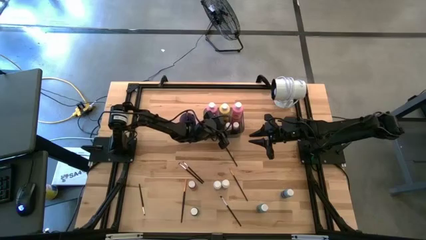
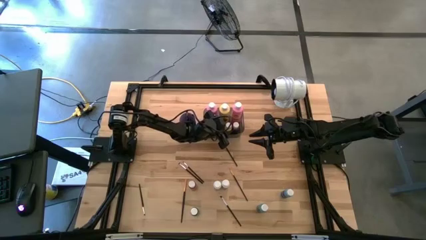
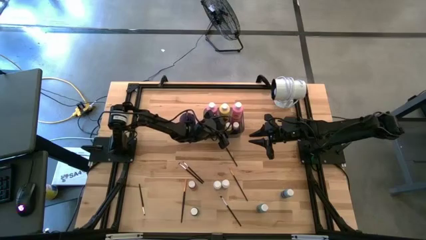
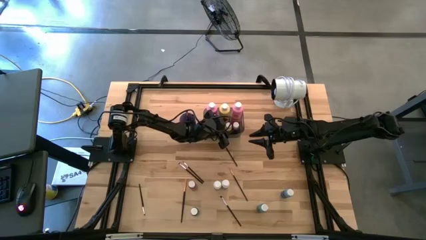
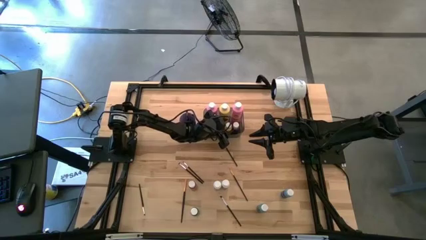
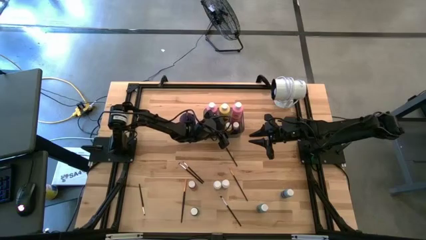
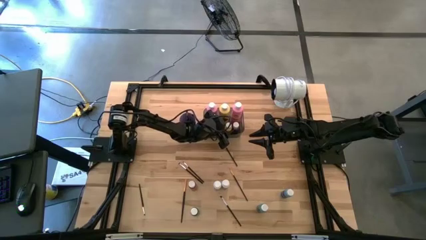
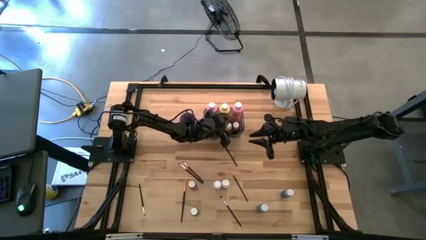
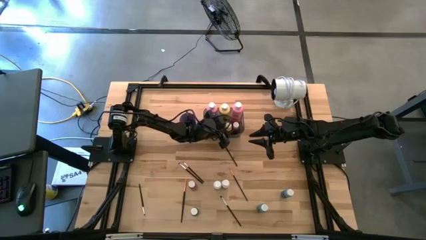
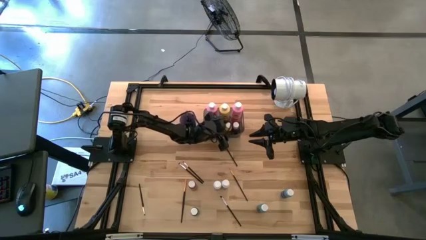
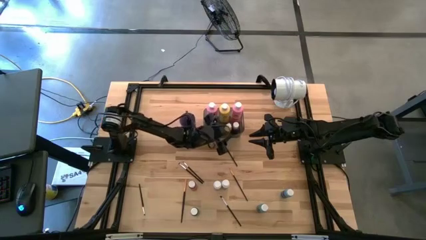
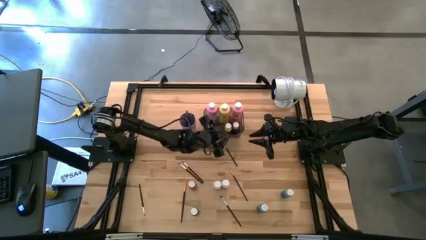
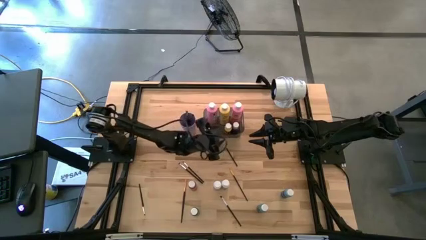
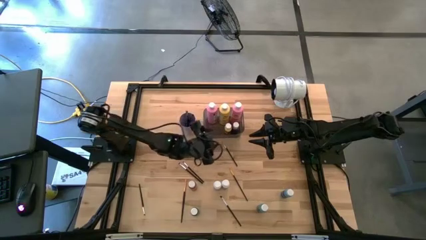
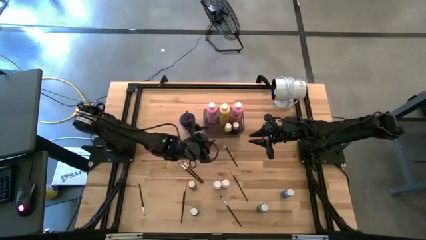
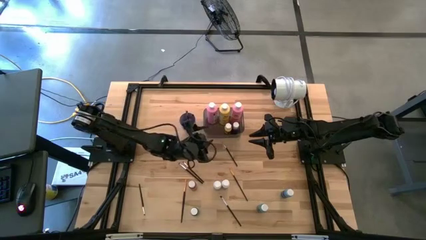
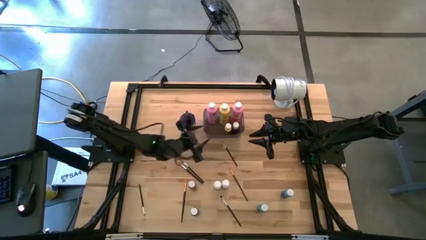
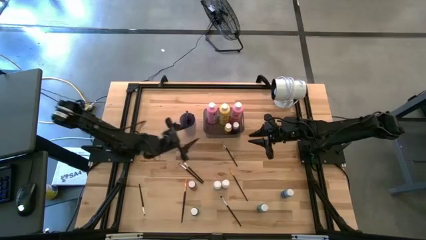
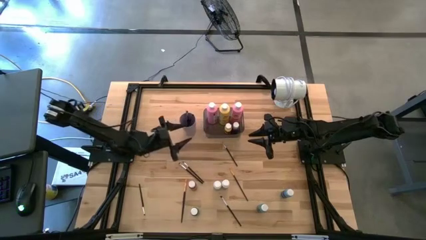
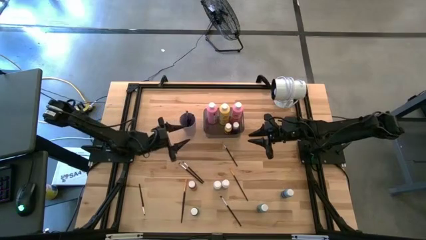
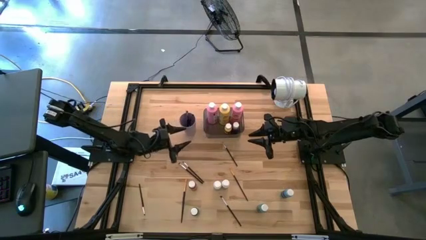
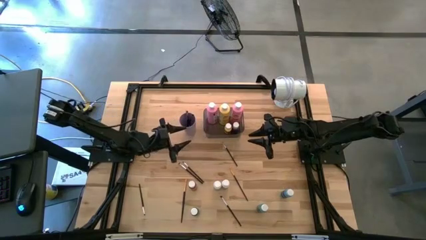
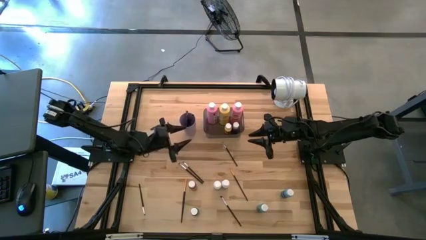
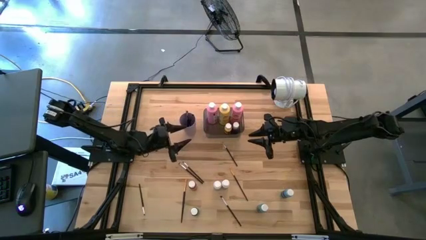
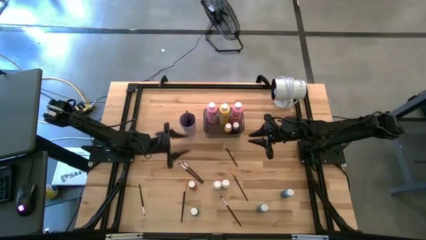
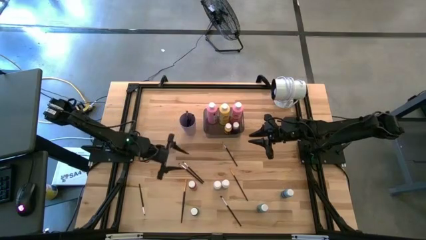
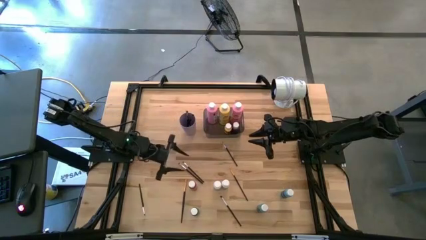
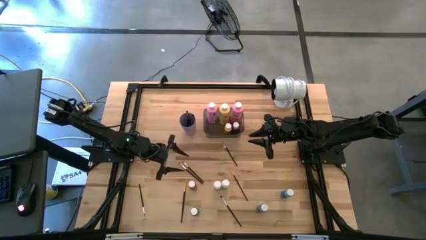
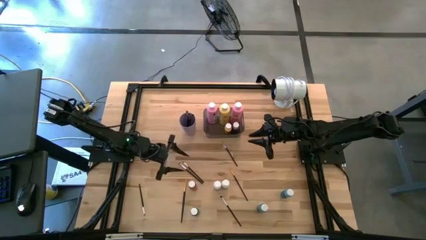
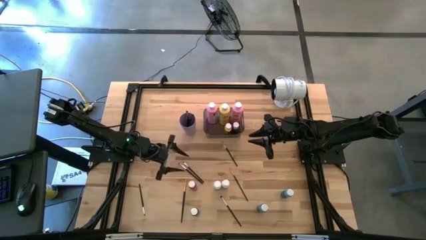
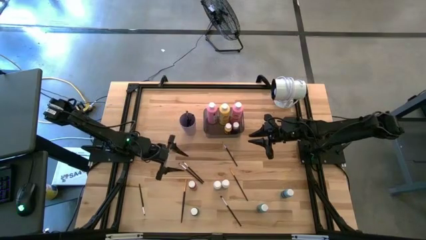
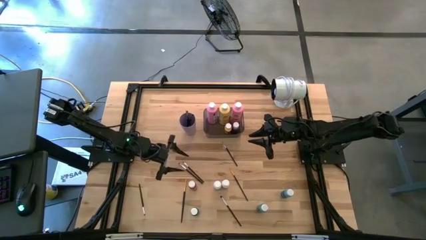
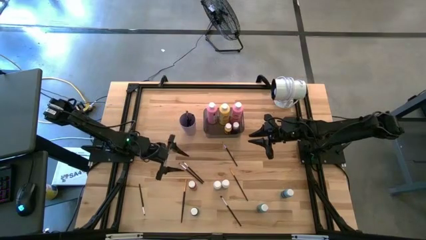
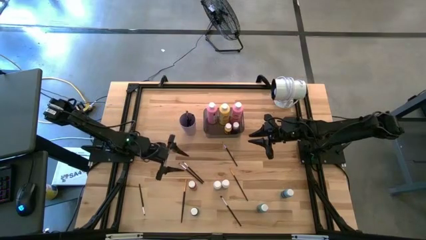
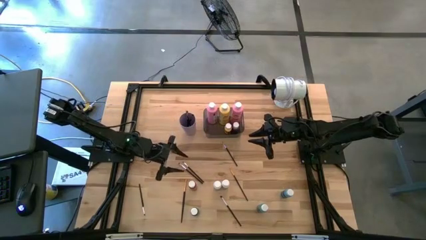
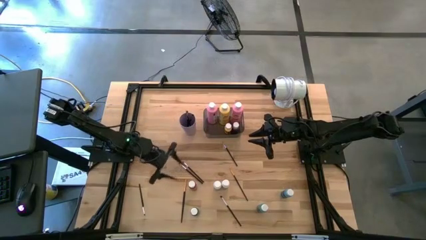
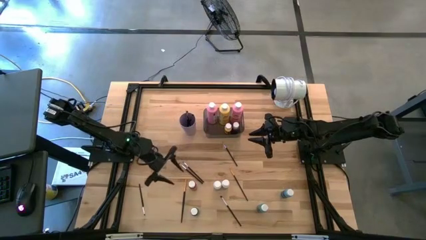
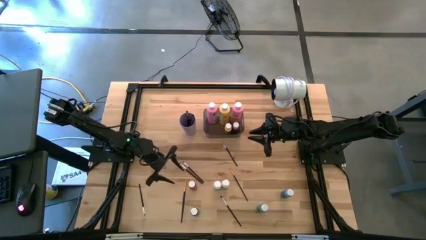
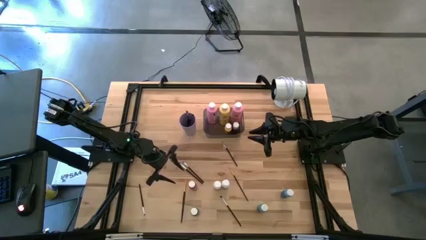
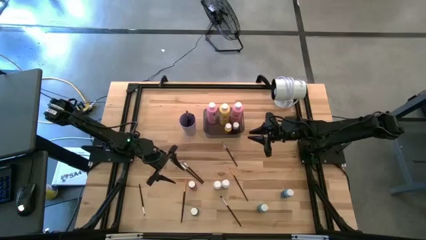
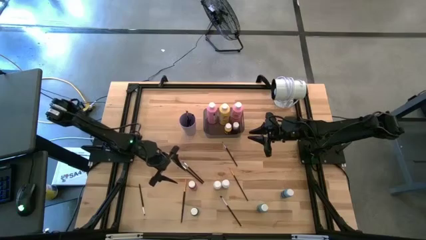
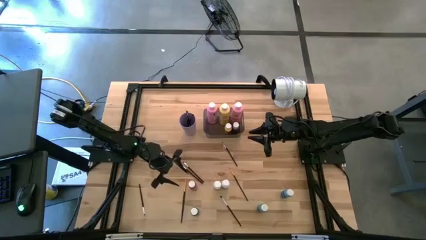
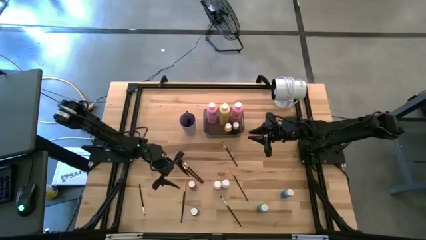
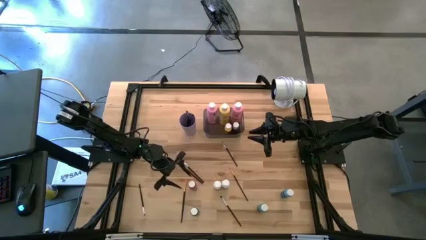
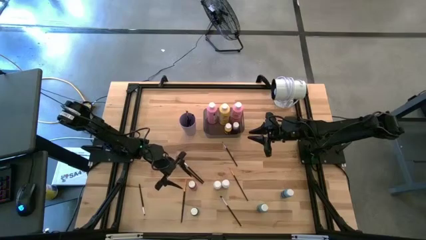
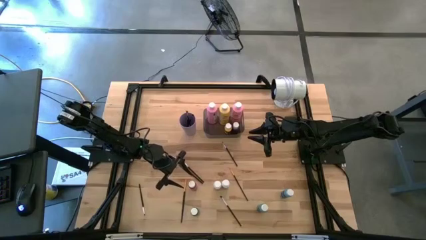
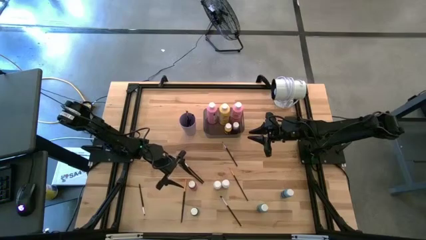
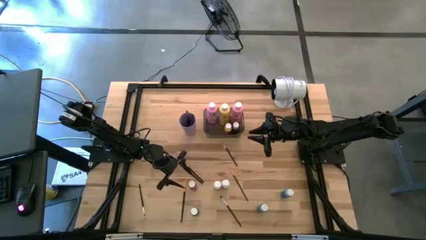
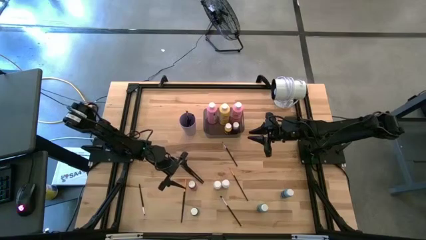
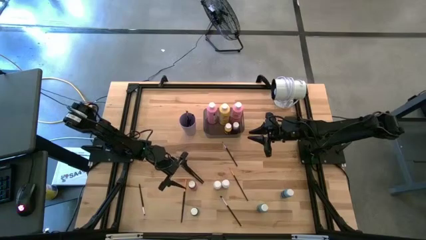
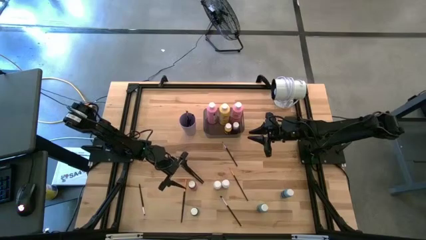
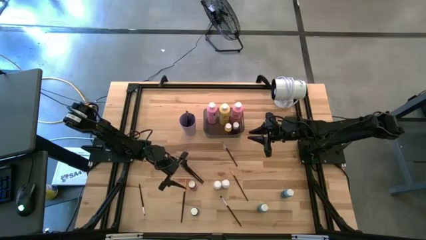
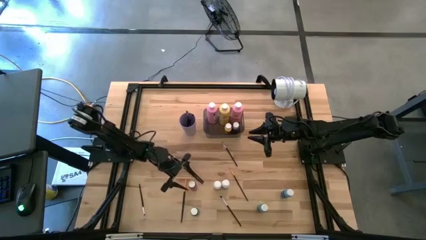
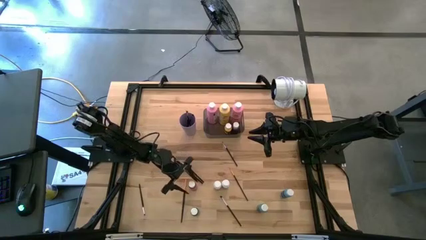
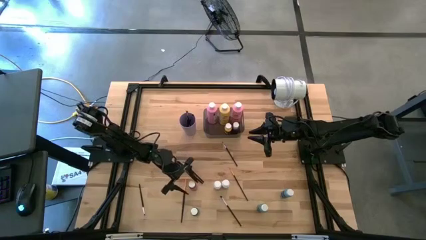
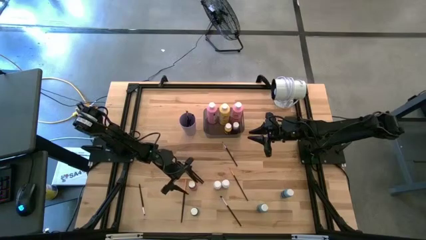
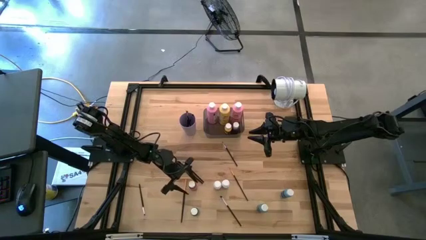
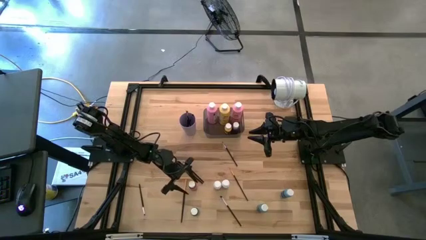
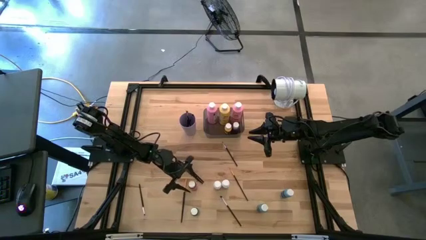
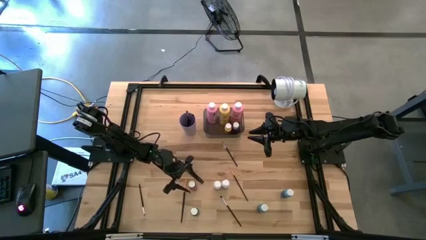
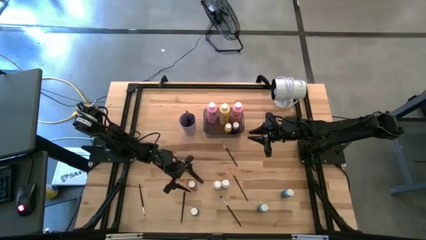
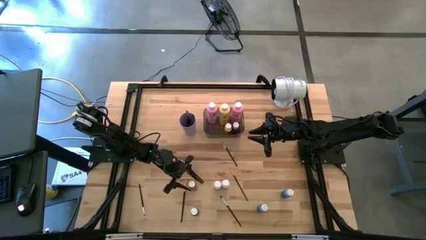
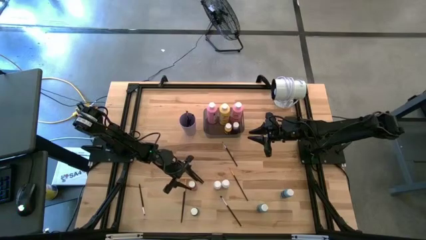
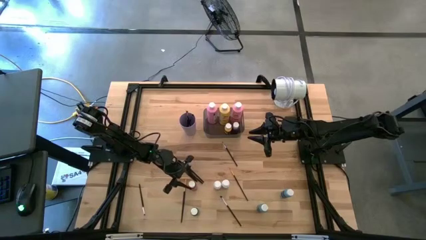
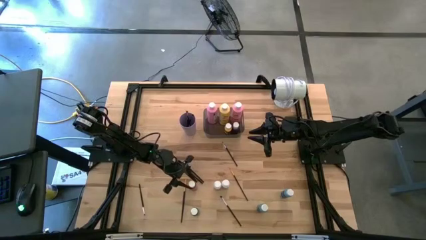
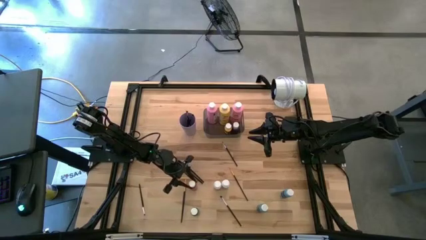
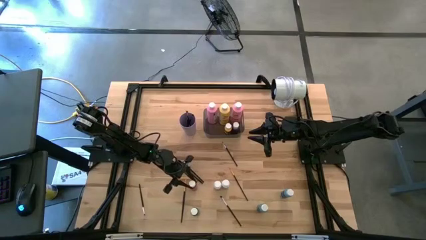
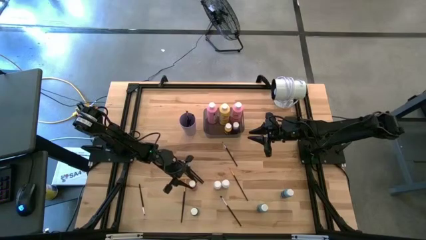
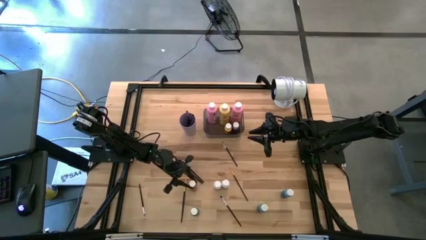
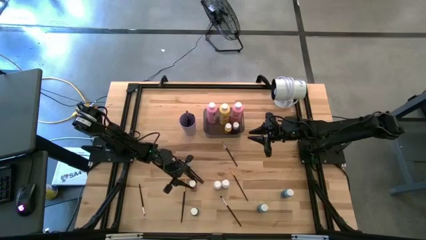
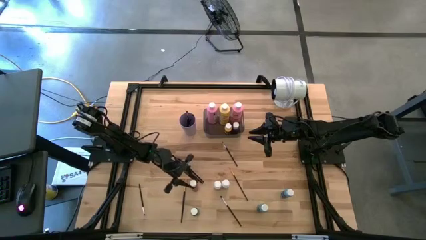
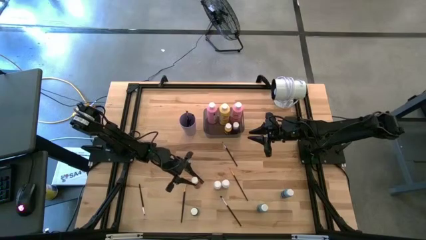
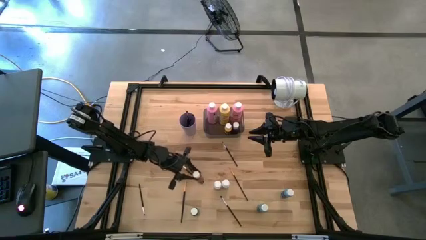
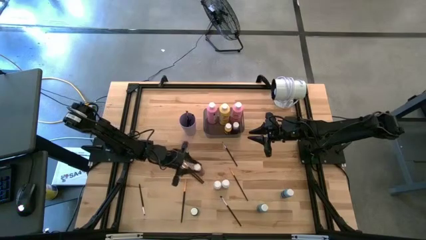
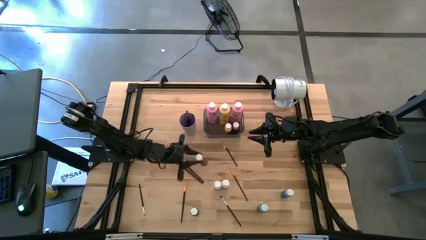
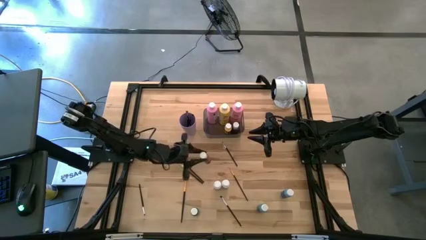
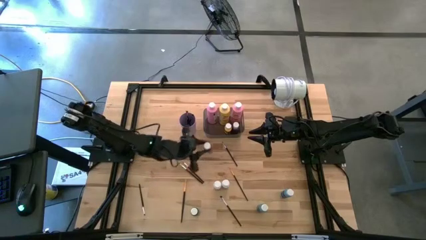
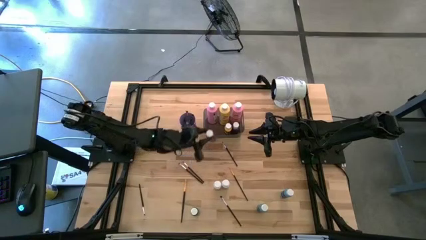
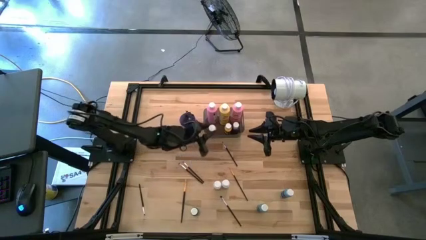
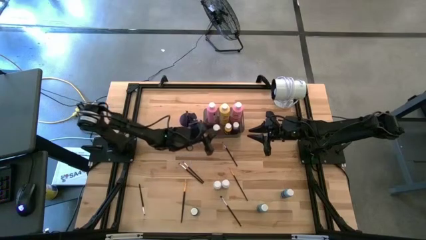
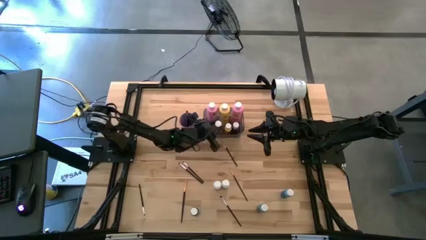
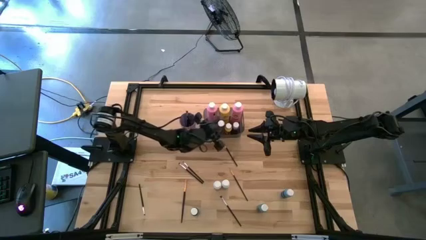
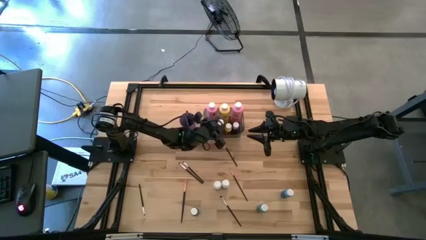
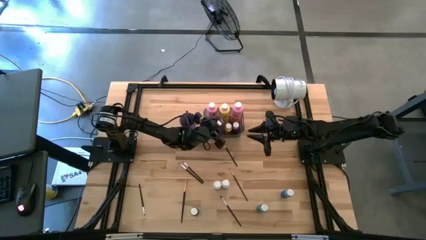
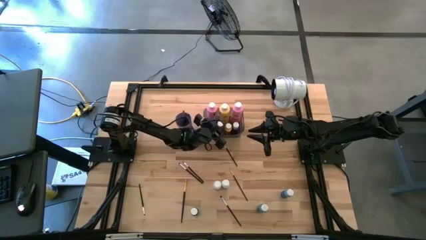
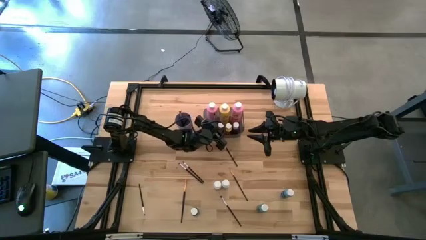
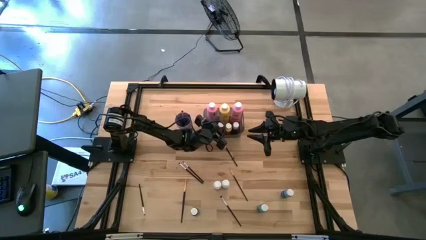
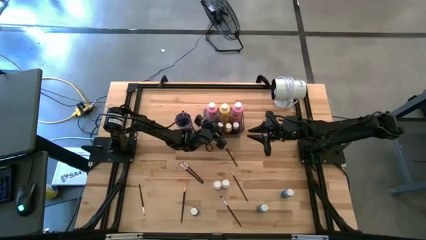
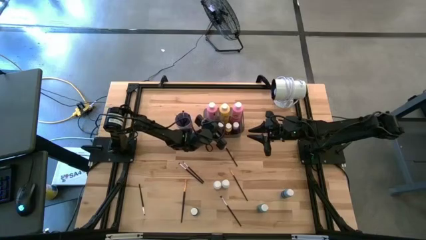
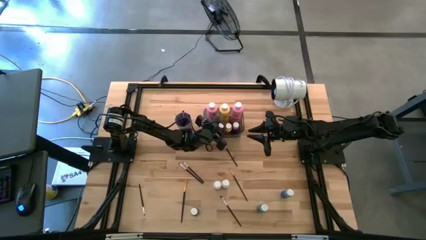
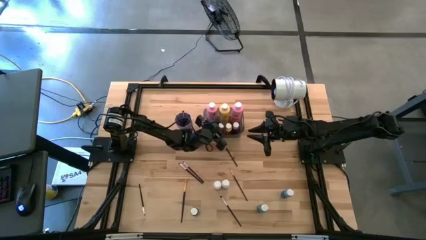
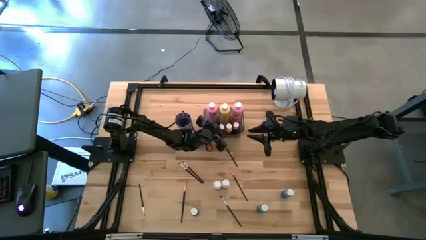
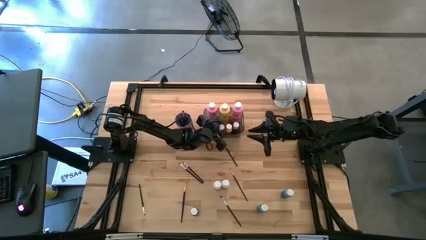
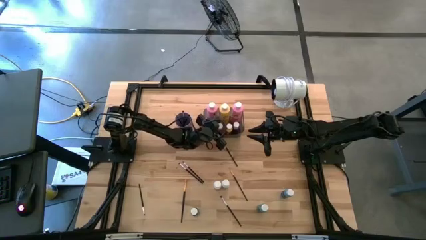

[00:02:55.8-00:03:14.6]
Task: Pick & Place Paint Supplies
Put the small red paint bottle into the gray bin
